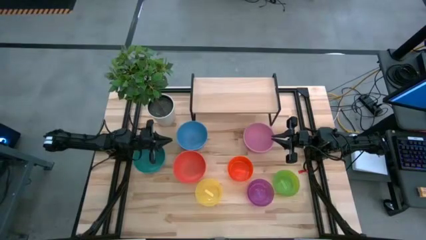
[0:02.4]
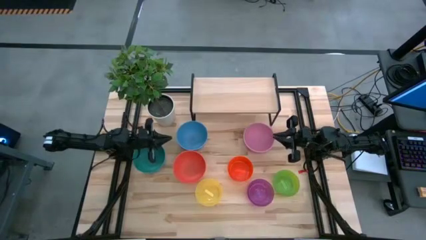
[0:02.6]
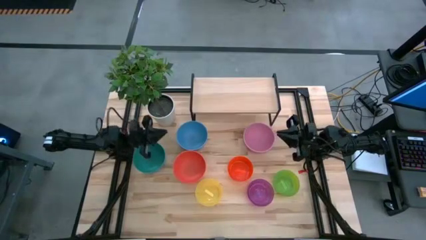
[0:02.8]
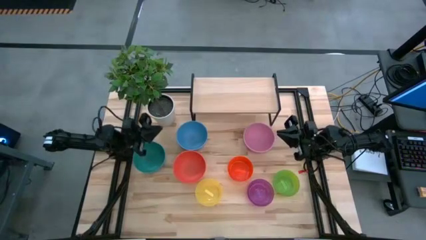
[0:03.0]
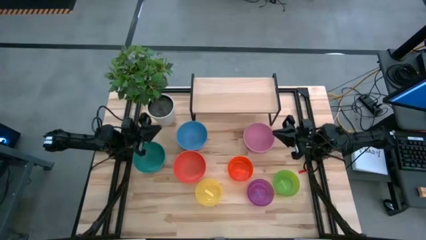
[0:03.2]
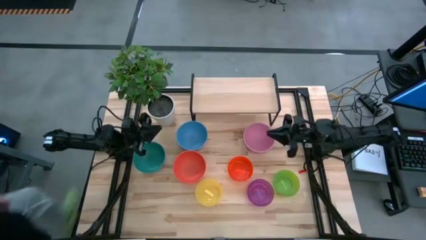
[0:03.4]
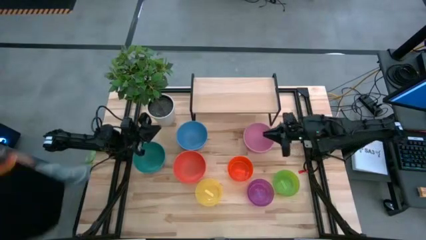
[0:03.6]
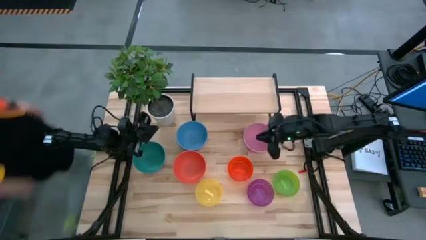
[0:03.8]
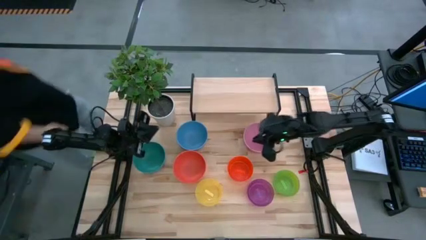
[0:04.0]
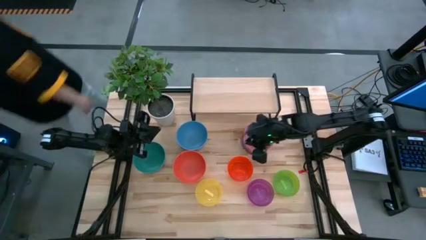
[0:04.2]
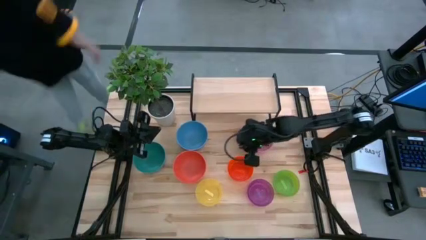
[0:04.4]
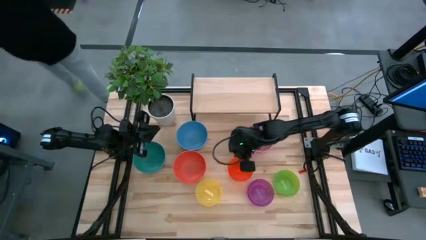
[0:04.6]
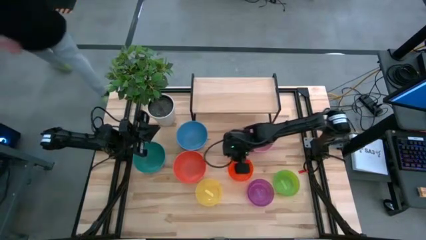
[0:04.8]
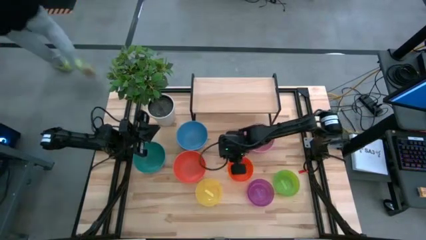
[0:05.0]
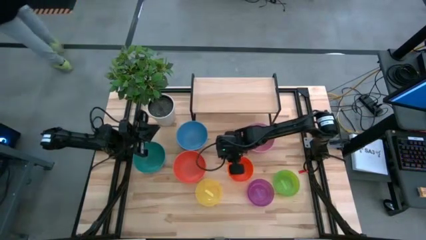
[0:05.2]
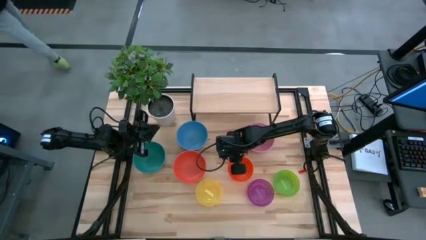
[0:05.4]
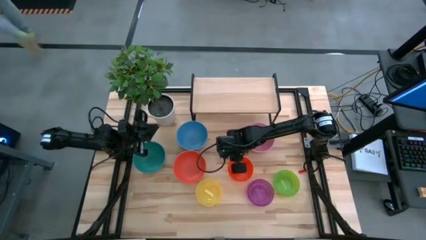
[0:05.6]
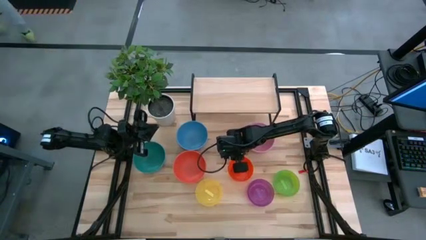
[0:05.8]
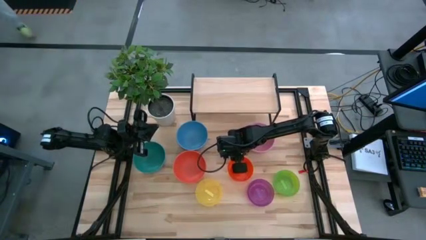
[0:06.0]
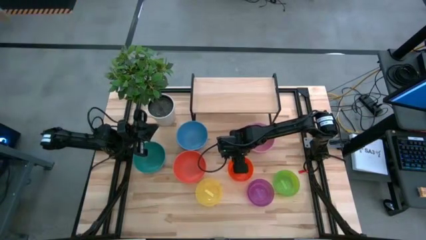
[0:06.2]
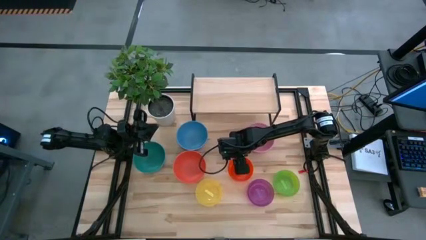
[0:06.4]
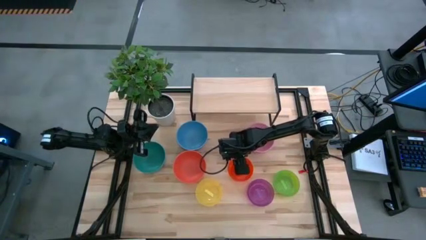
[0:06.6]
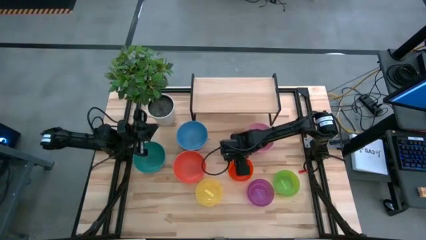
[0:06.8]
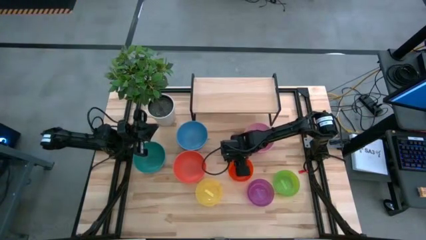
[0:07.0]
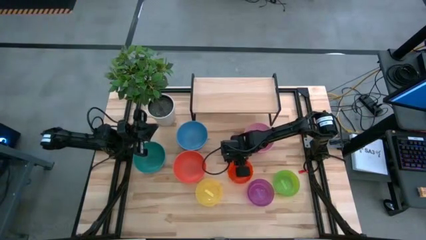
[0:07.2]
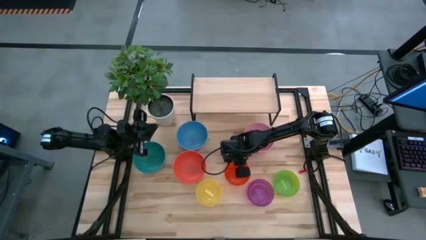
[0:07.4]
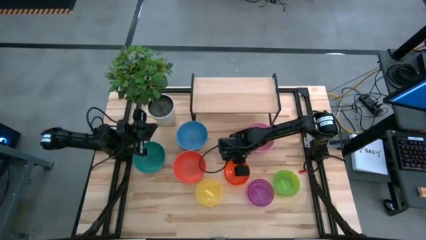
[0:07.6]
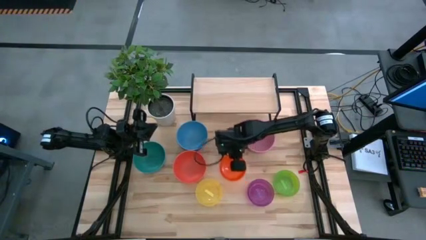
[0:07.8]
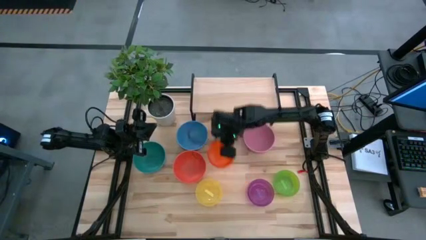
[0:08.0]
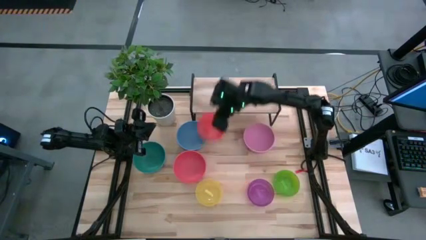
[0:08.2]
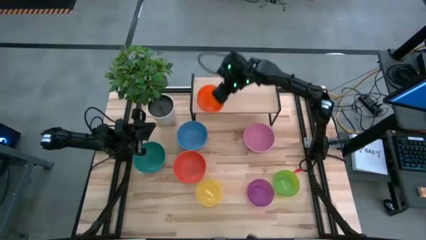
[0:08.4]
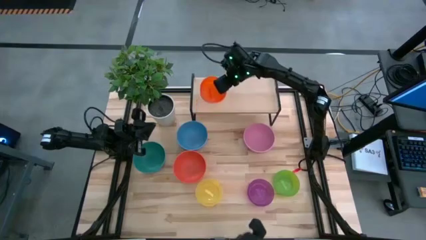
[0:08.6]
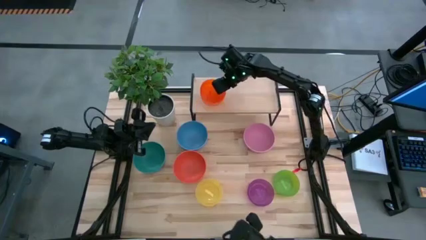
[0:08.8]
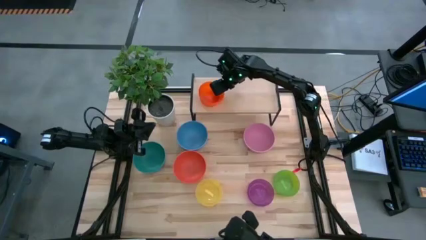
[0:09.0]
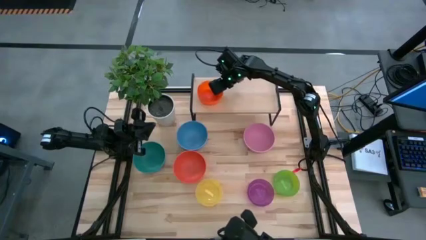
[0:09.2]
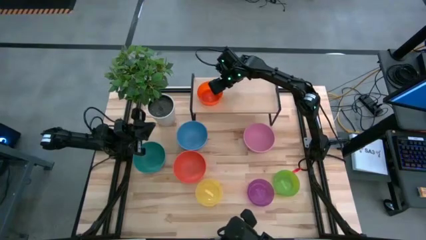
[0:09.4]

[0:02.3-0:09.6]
Task: Place and stack bowls onto a shelf
Put the transparent orange bowl on the shelf

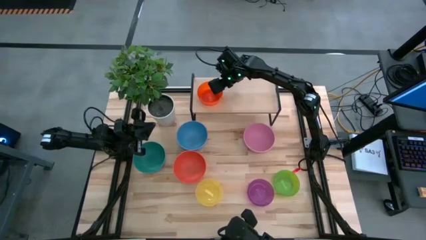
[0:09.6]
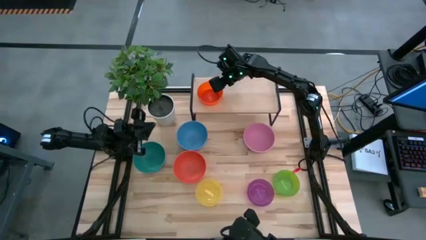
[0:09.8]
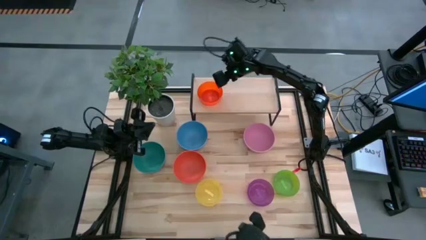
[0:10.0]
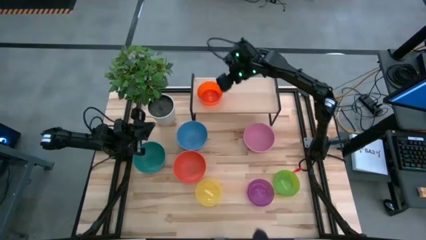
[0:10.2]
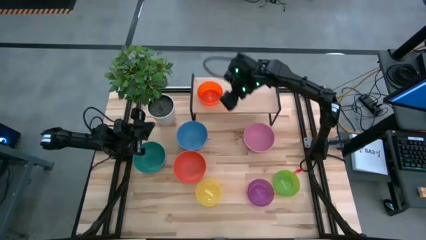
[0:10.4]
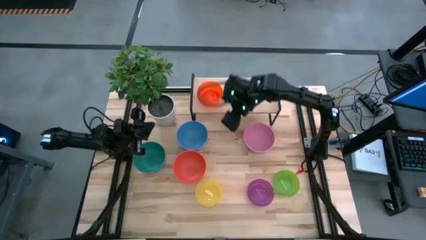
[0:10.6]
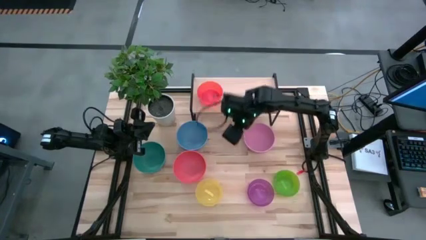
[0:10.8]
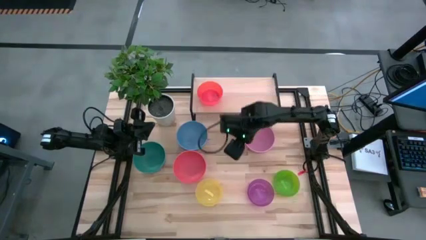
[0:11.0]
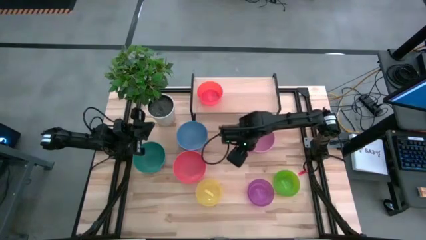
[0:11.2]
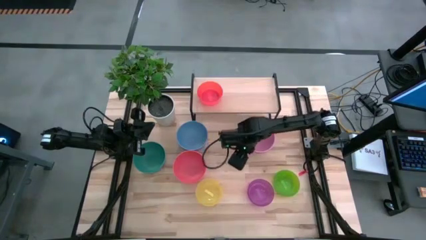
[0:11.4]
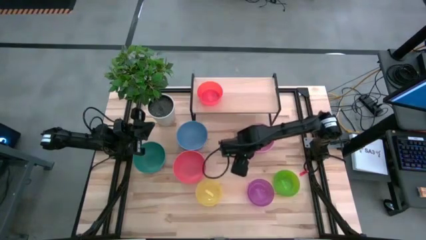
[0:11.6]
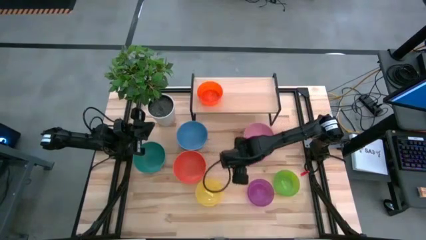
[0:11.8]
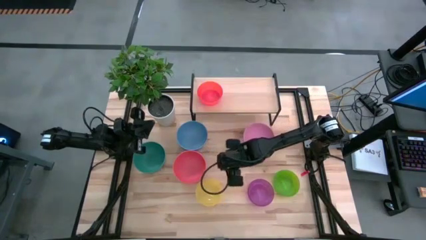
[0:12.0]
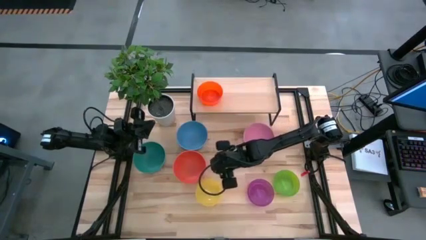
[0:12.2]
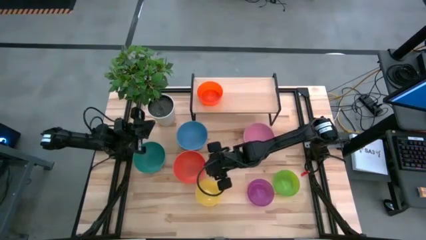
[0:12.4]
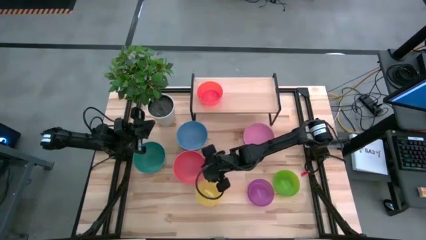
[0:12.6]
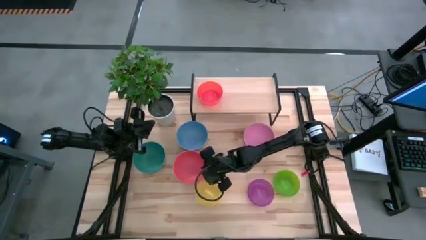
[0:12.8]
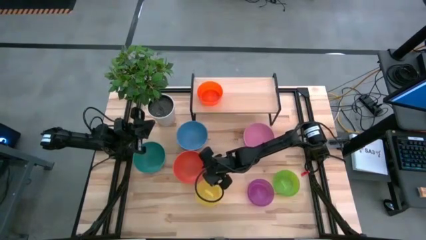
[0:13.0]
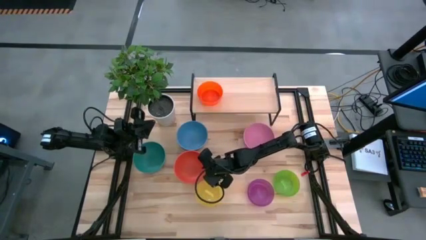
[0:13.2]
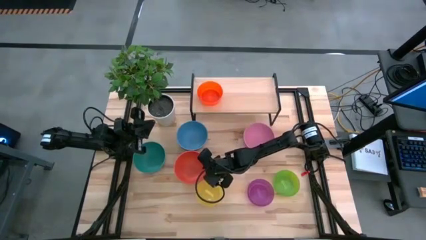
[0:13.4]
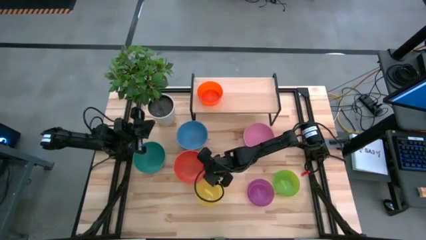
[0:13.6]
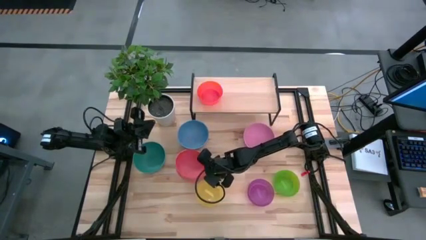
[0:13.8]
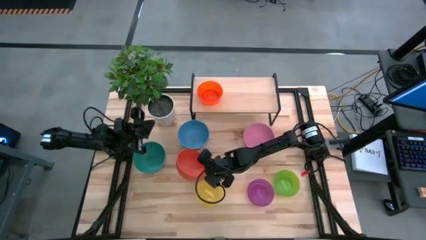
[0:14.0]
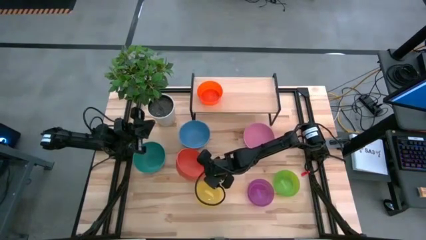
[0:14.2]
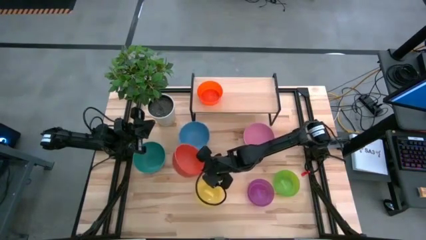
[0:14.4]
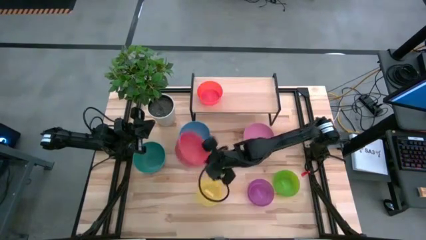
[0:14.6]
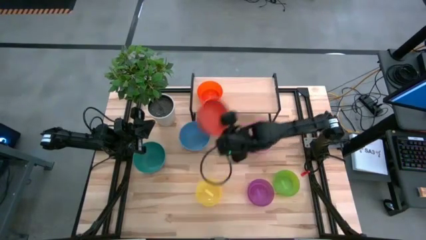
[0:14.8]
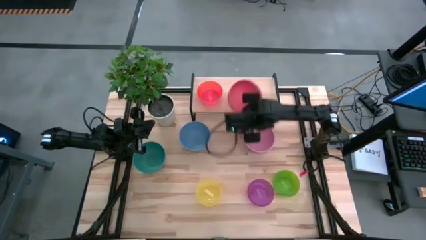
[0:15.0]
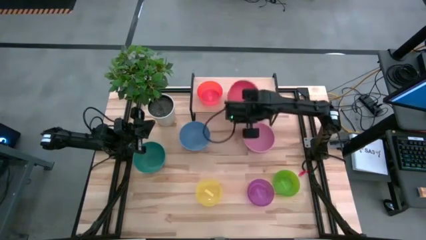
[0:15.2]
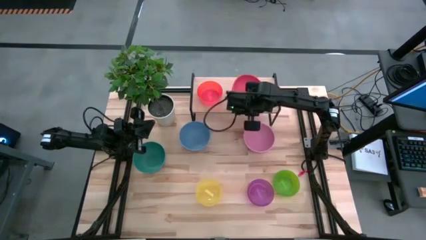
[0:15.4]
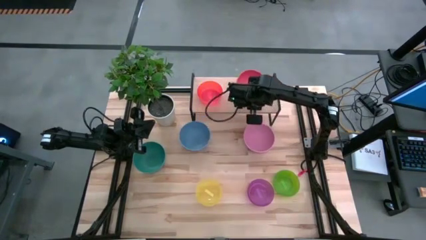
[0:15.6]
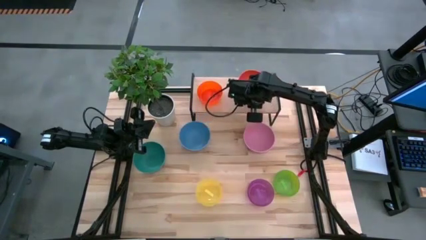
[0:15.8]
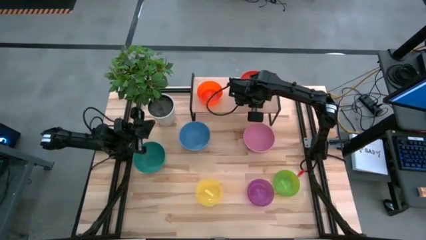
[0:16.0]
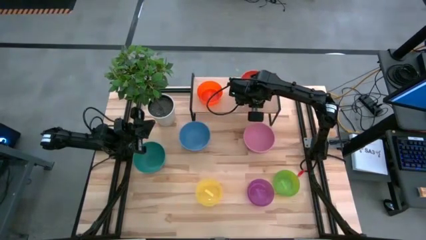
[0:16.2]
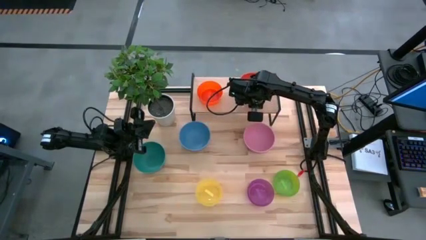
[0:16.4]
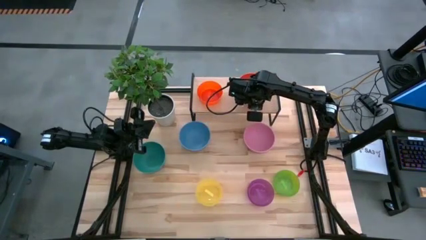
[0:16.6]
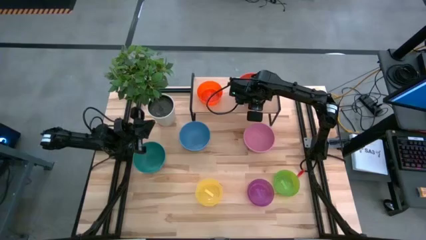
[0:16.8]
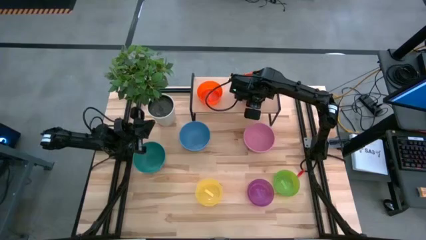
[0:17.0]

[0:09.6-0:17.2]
Put the orange bowl on the shelf

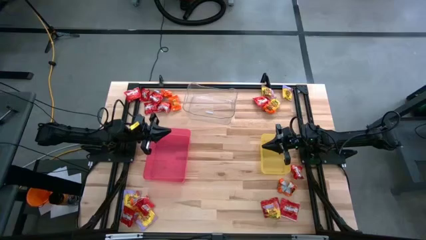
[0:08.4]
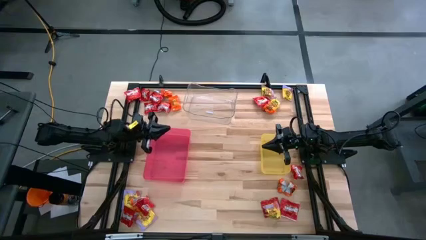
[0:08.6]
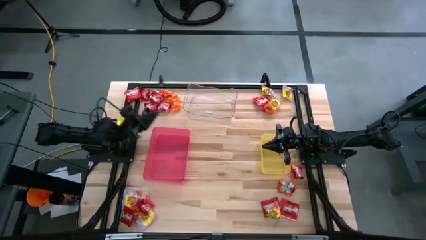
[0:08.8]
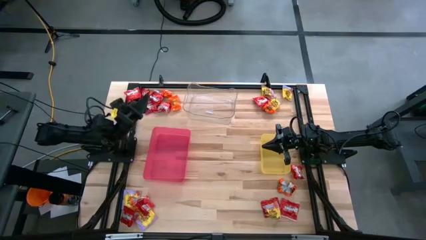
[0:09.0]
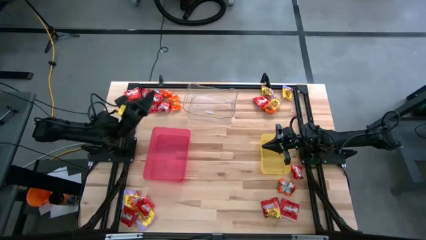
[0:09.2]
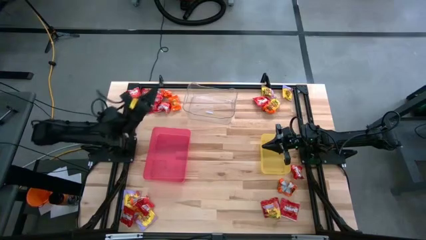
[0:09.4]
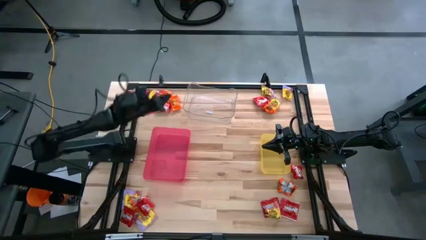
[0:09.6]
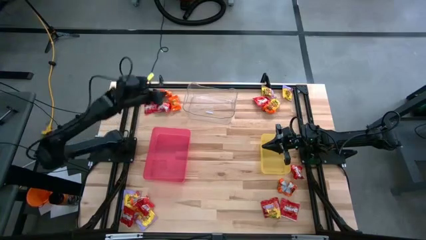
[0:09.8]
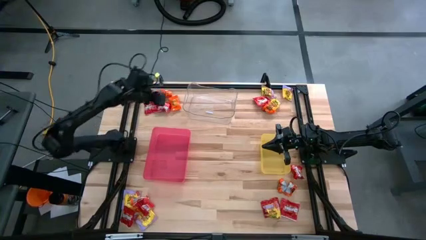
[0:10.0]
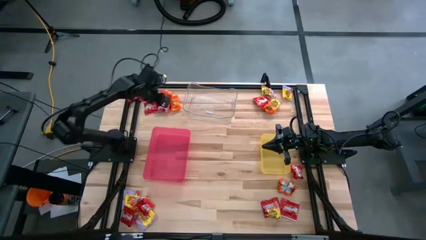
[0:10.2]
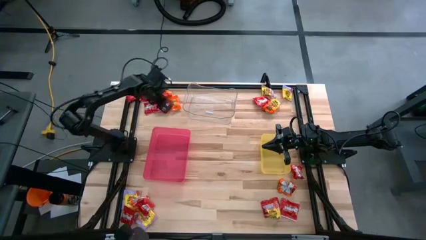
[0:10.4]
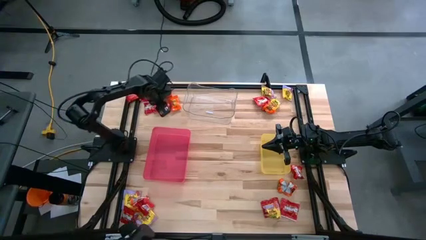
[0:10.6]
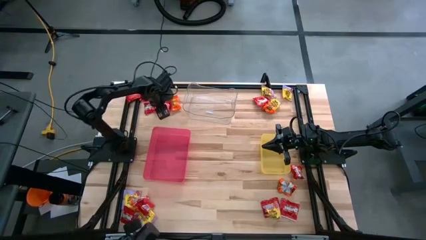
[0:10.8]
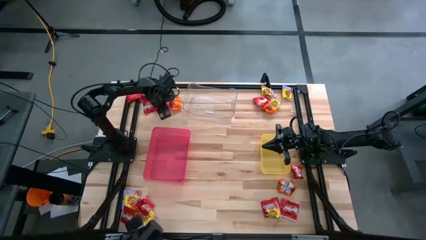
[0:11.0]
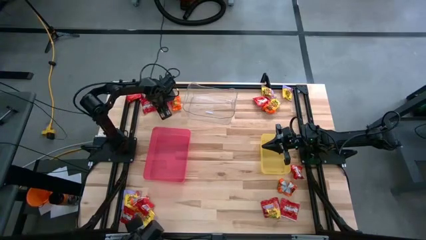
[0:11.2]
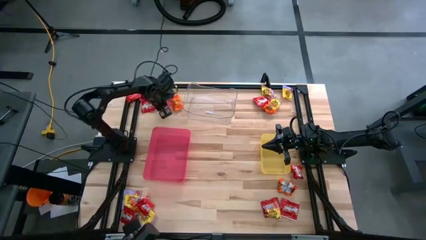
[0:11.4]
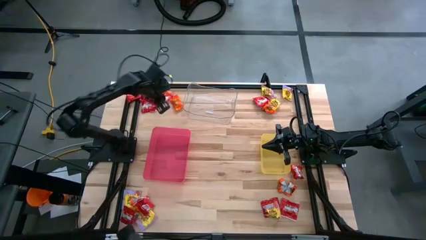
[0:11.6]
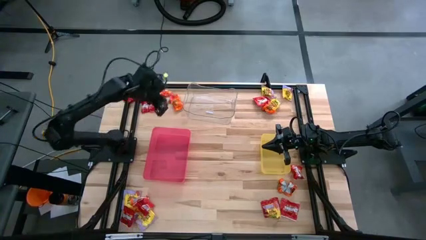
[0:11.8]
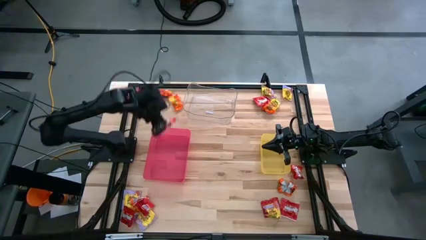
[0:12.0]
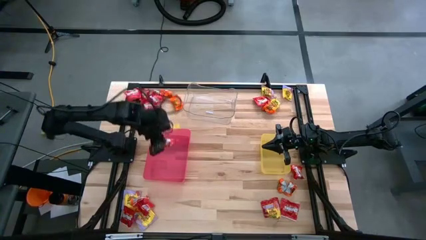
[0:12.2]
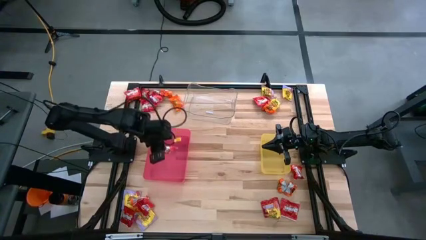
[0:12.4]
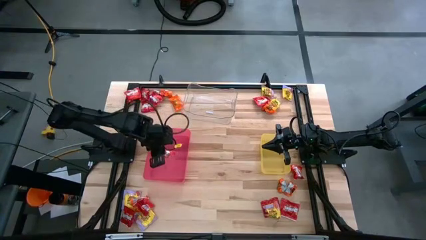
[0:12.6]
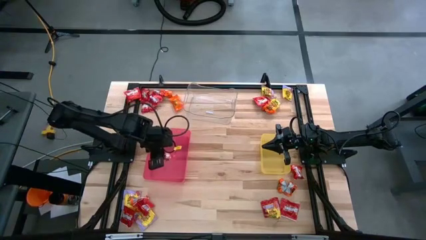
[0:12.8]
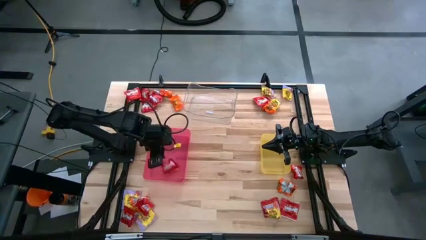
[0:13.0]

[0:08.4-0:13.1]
Task: Sort candy
Put the red candy into the red bin
